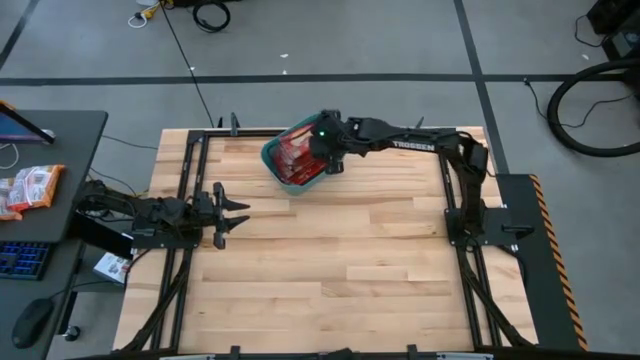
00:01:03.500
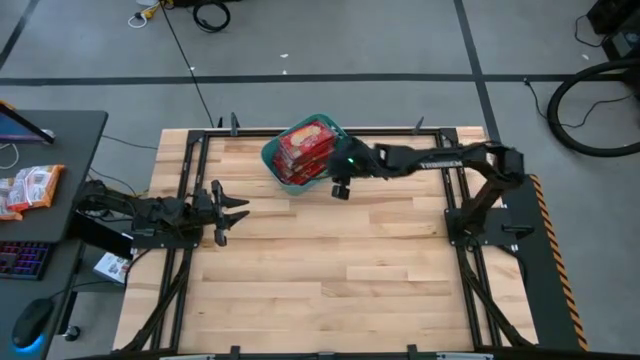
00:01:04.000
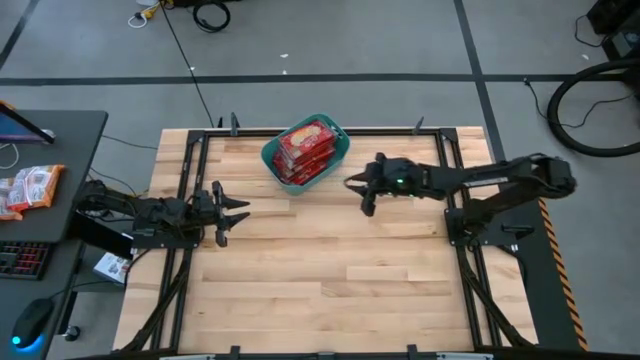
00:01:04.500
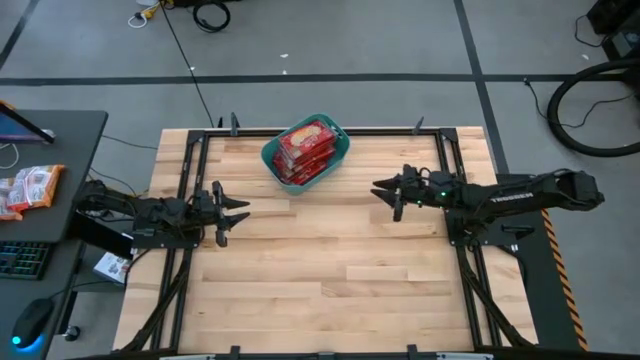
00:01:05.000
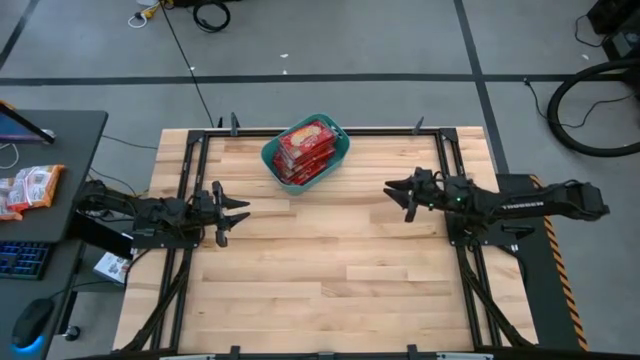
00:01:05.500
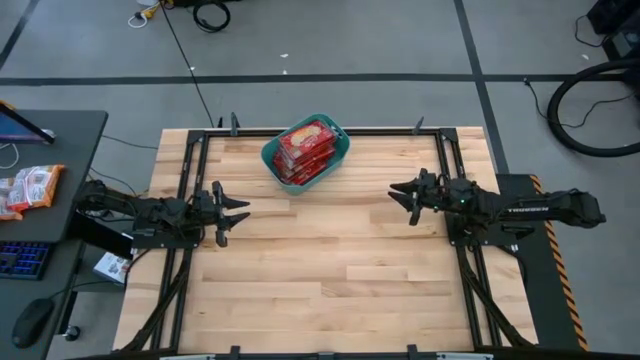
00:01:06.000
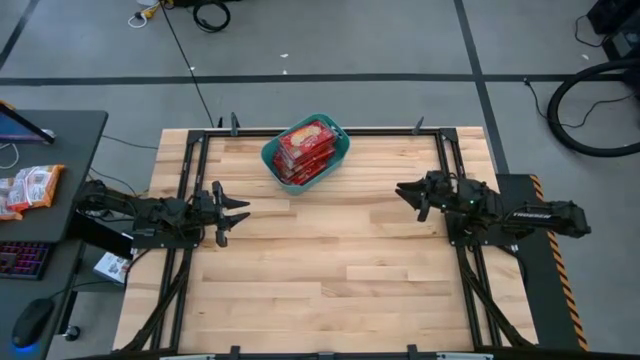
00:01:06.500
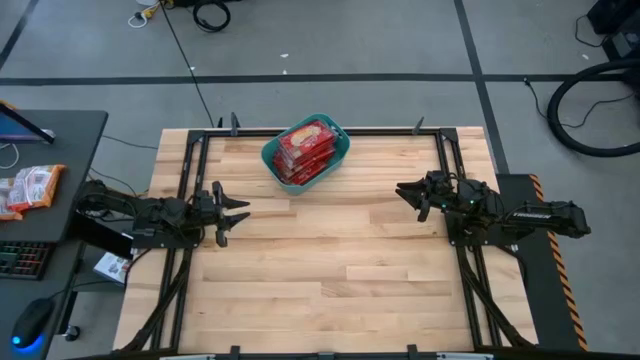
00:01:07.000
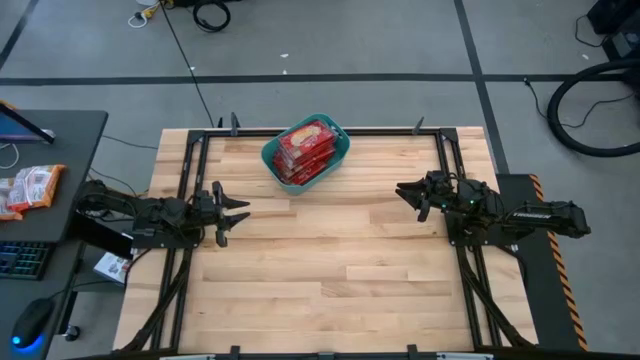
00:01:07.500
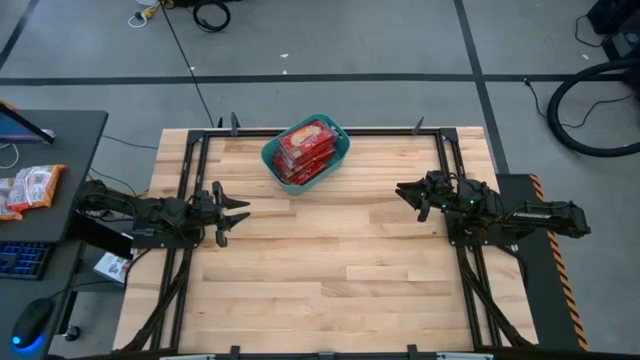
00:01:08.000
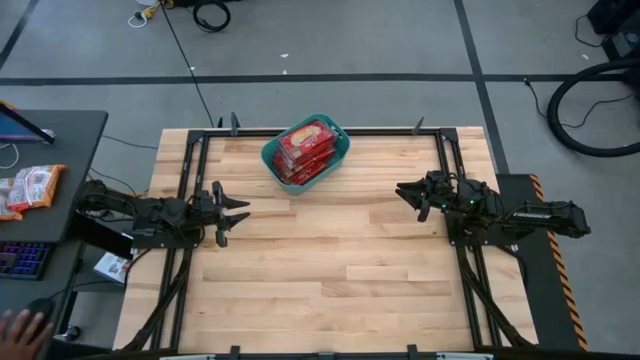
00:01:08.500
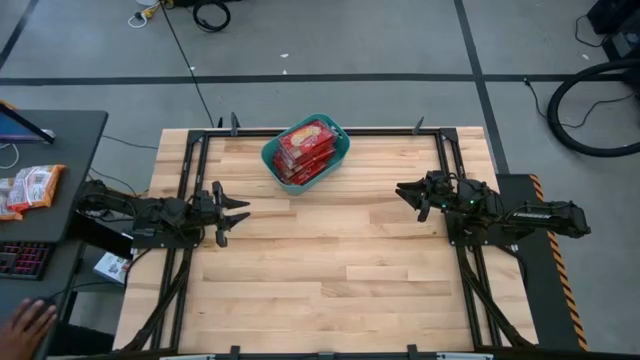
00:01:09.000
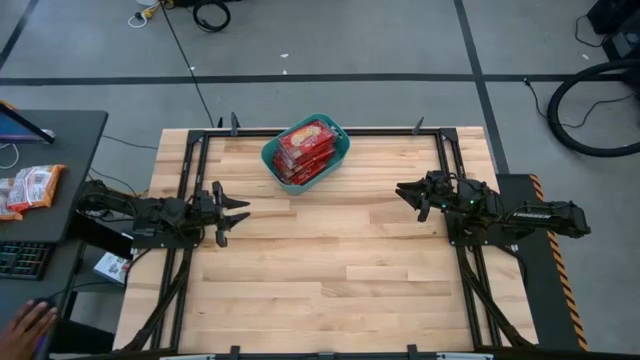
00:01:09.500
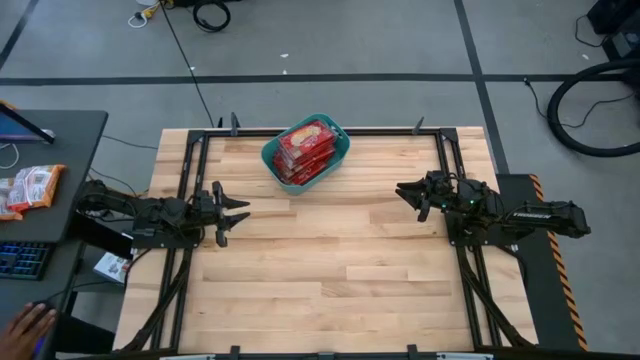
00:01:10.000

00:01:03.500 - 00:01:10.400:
Task: Sort popcorn bags into baskets
Return To Home Position

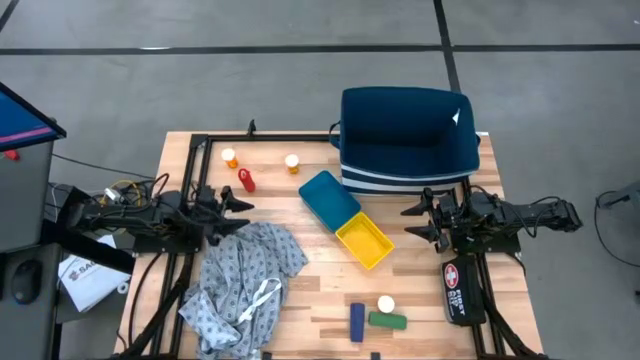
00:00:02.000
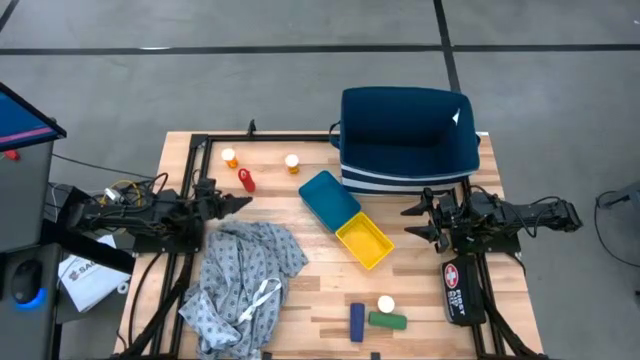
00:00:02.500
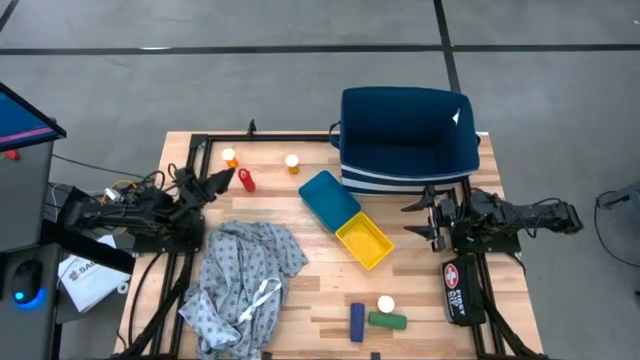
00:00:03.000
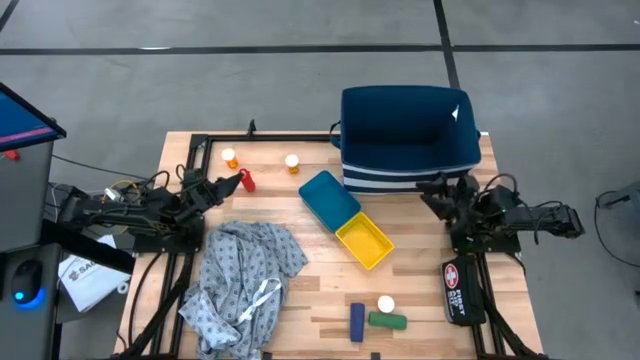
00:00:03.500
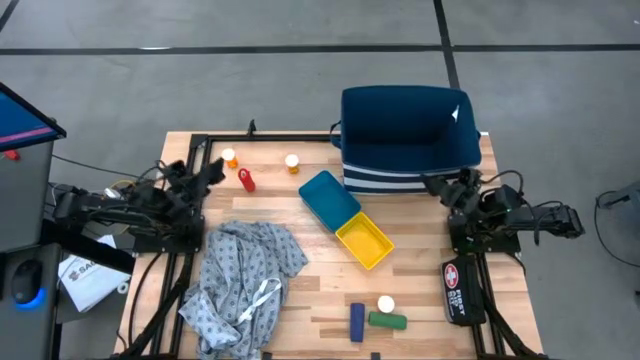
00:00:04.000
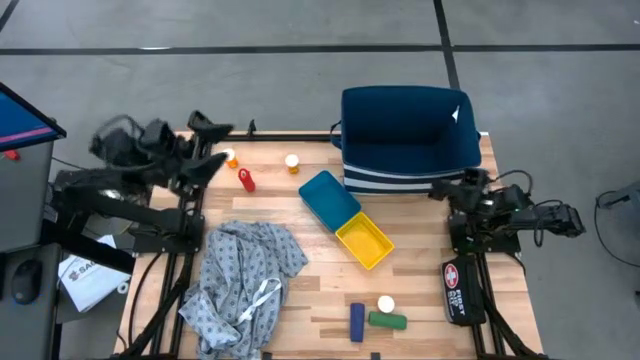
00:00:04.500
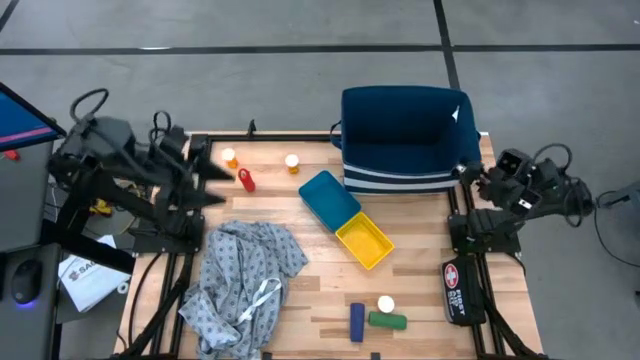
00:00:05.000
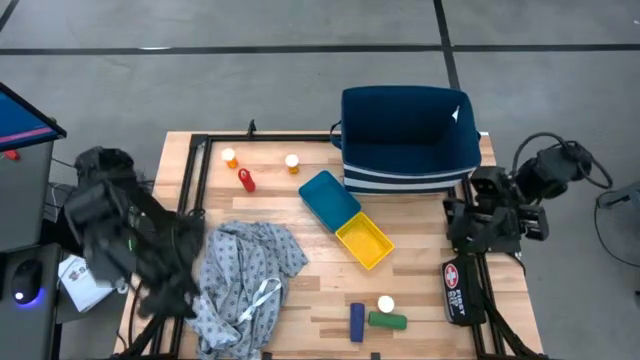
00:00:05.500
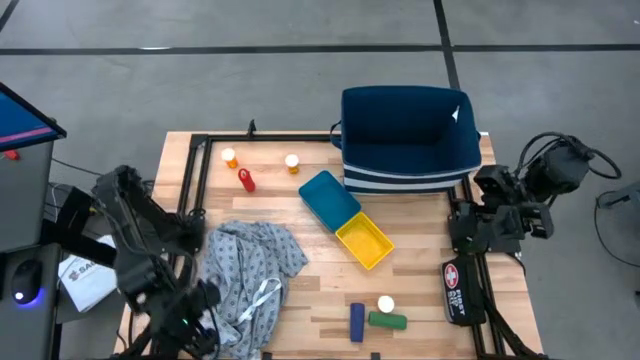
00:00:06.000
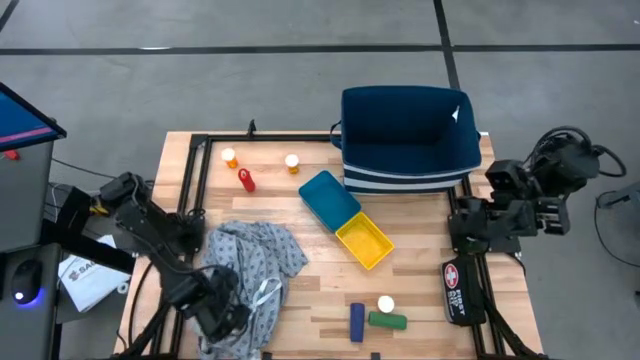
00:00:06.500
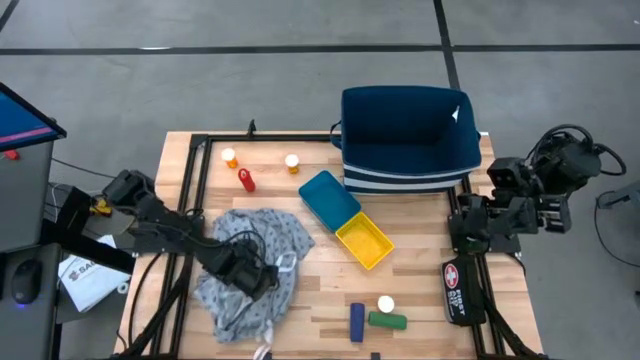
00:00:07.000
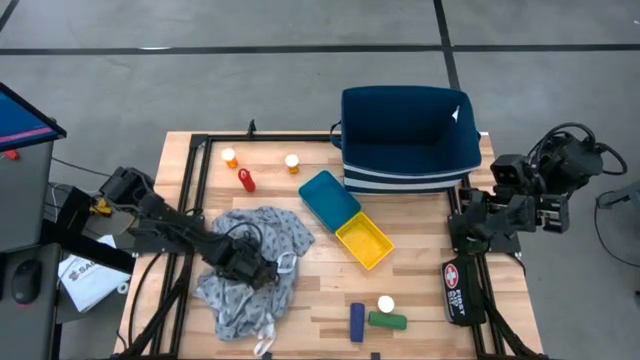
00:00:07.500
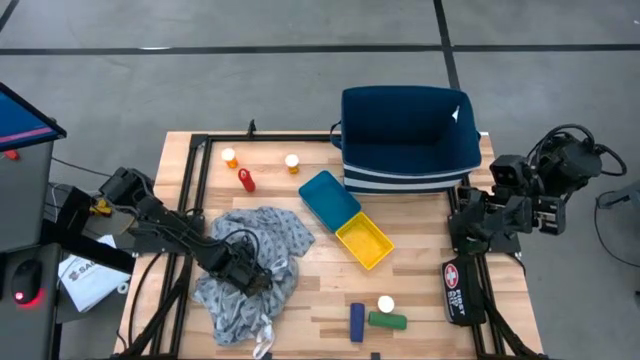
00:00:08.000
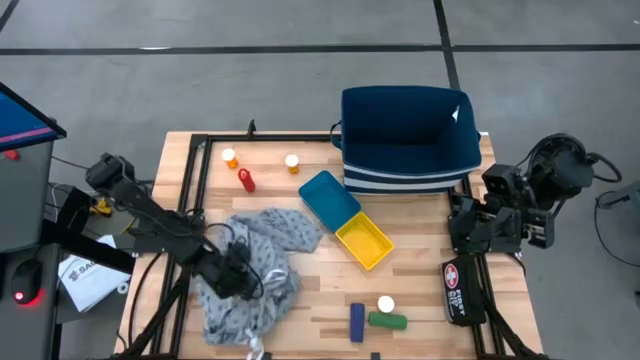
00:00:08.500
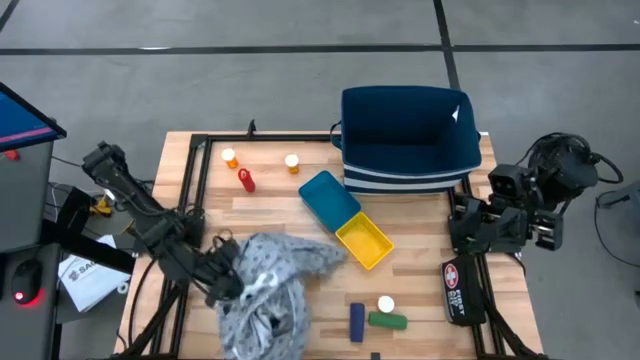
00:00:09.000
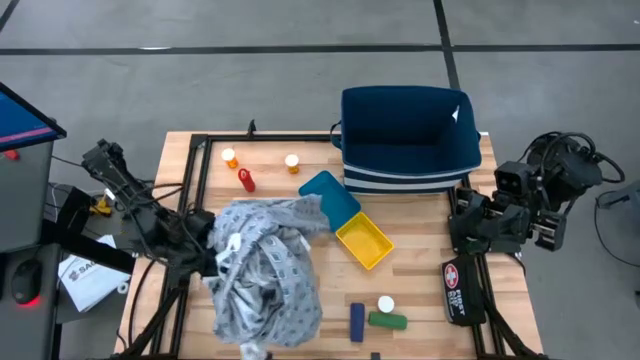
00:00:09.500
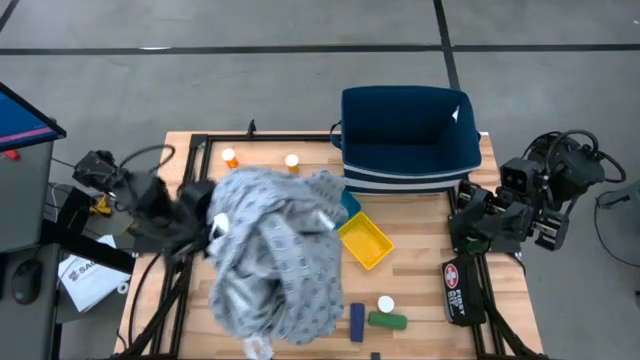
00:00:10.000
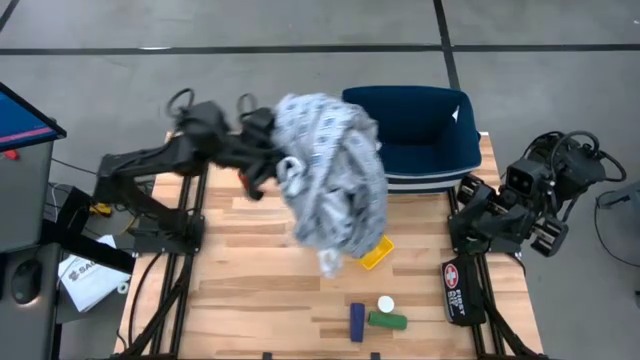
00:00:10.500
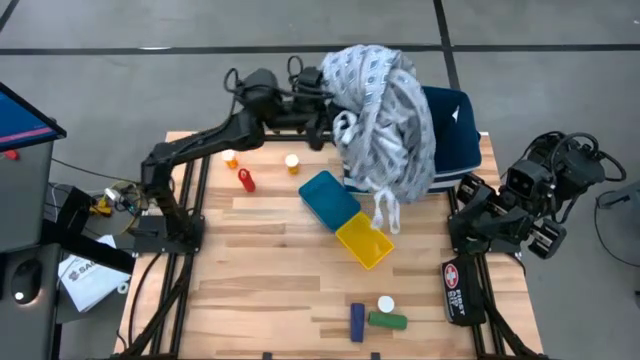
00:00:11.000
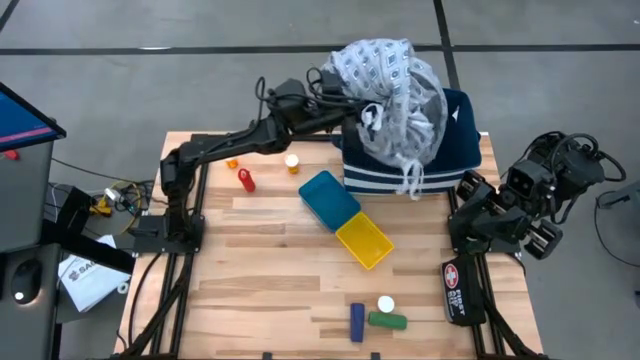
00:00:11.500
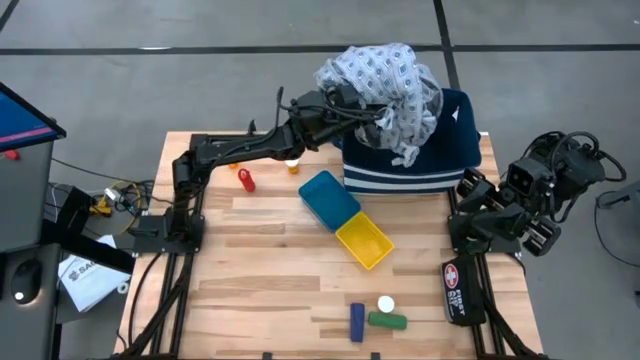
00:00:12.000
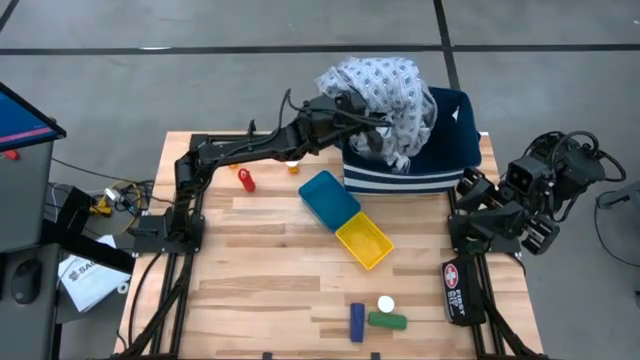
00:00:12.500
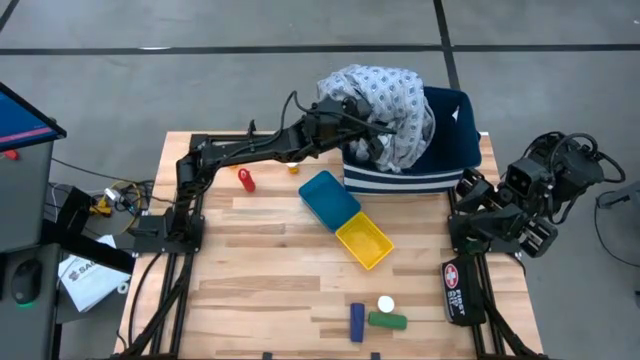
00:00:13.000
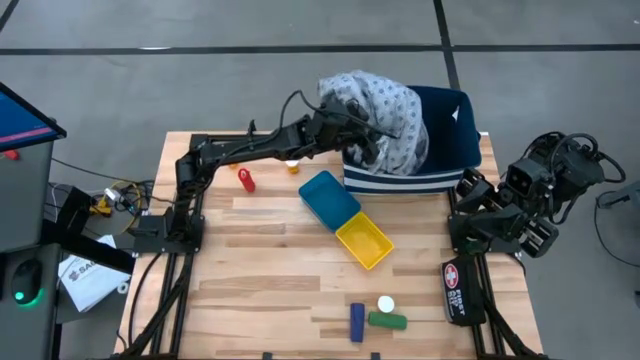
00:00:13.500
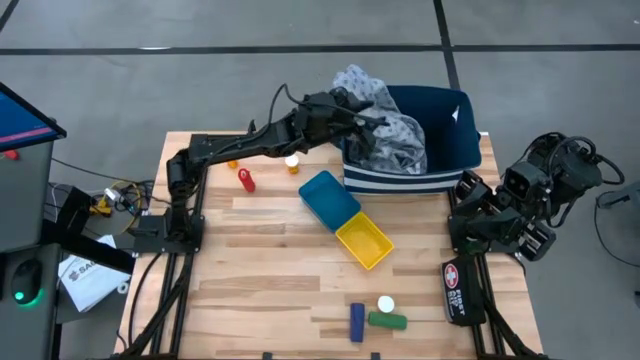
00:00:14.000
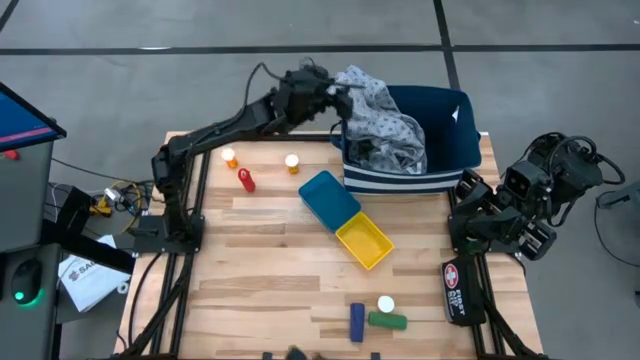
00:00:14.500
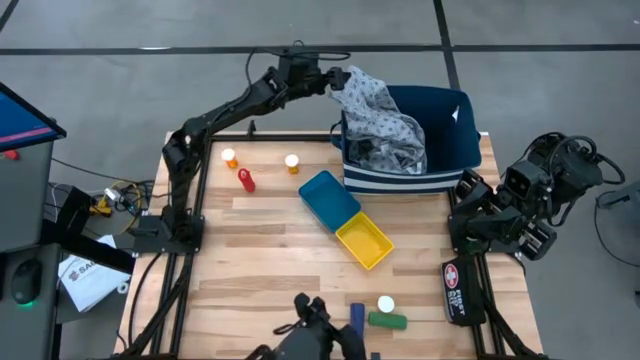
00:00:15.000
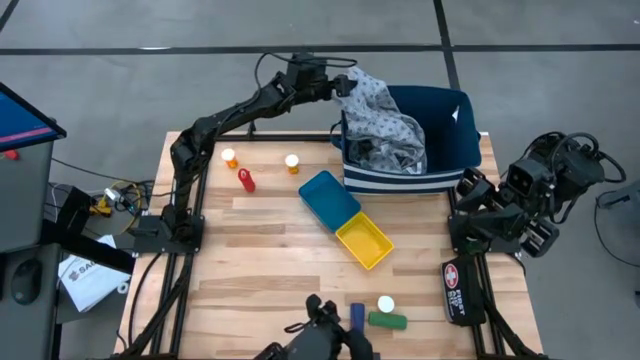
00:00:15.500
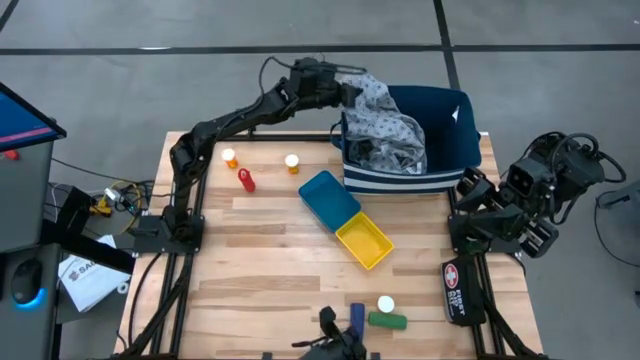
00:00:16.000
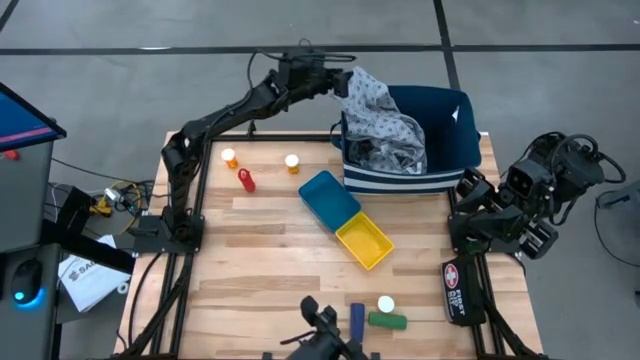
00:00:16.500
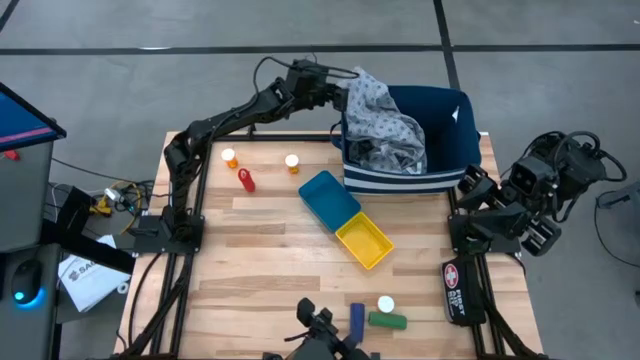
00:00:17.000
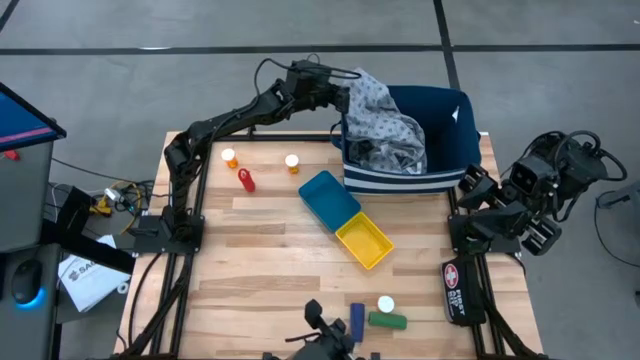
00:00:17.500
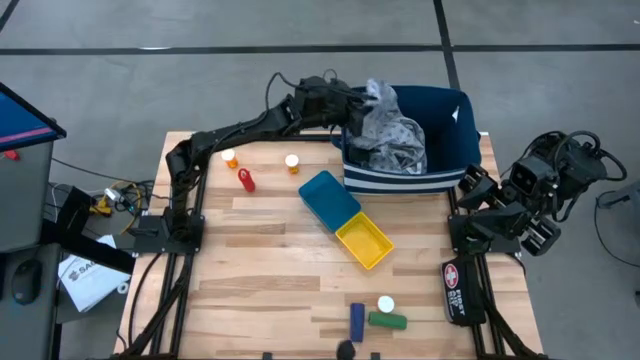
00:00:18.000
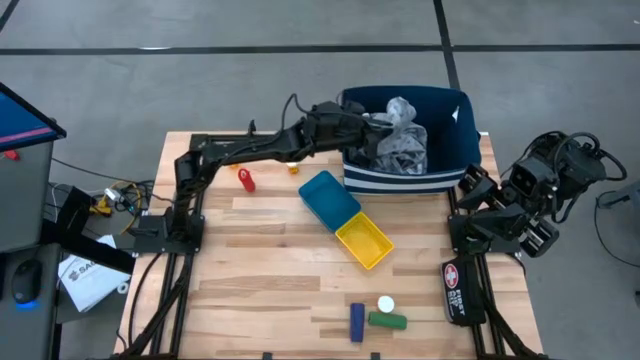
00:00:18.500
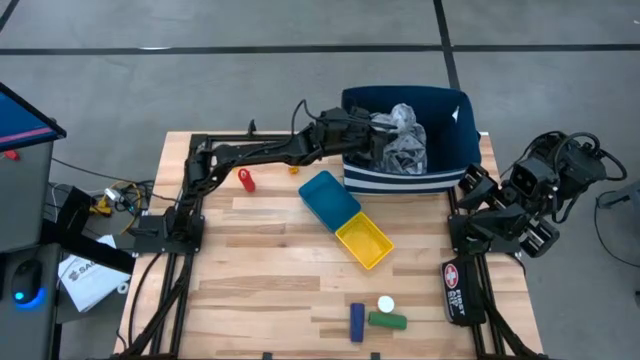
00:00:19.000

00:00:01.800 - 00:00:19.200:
Task: Pick & Place Medicine items
Put the gray patient gown into the blue laundry organizer
